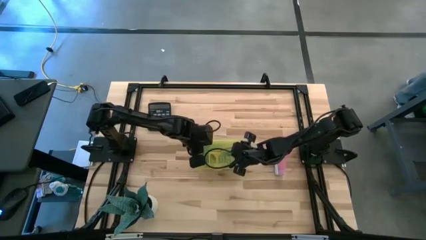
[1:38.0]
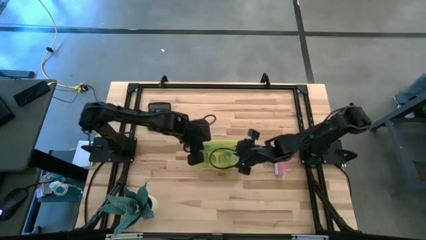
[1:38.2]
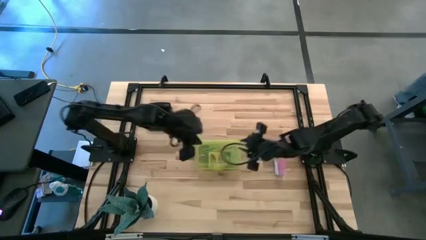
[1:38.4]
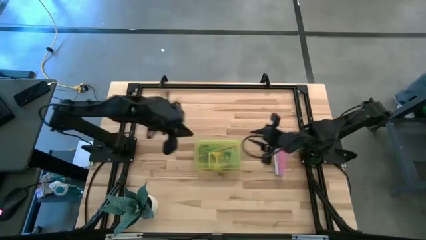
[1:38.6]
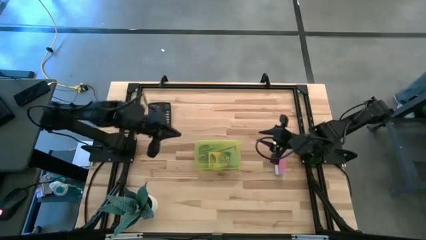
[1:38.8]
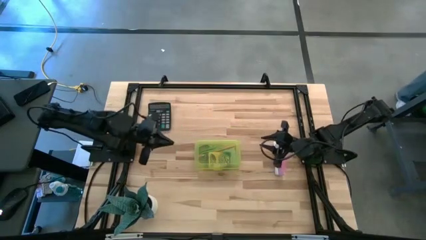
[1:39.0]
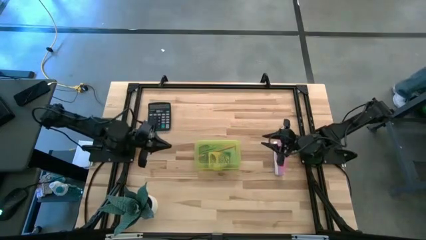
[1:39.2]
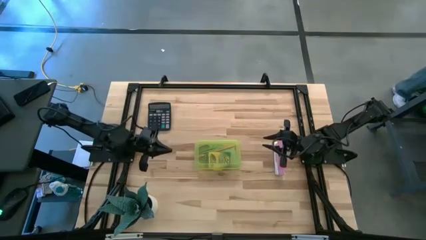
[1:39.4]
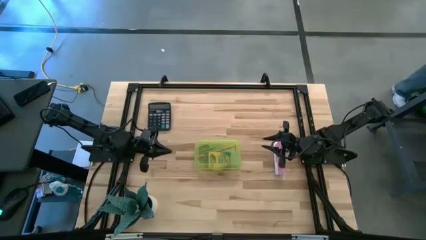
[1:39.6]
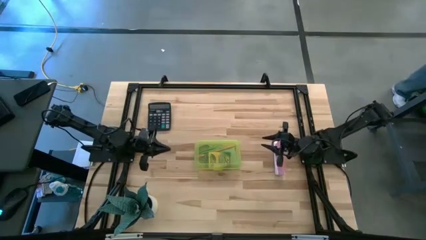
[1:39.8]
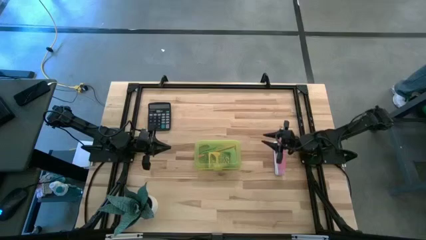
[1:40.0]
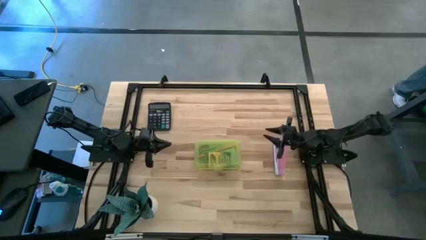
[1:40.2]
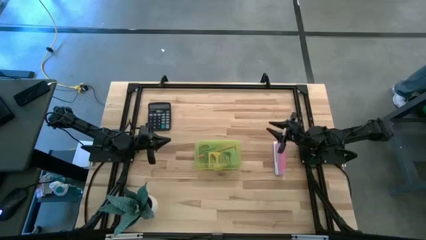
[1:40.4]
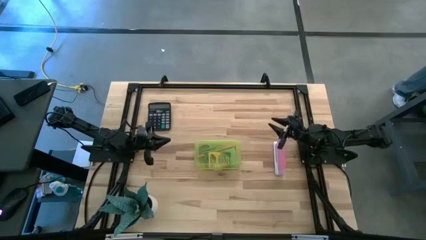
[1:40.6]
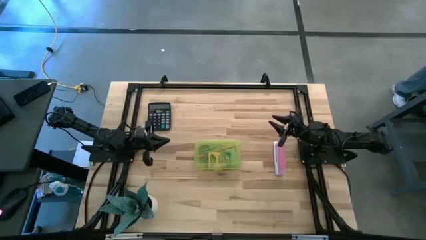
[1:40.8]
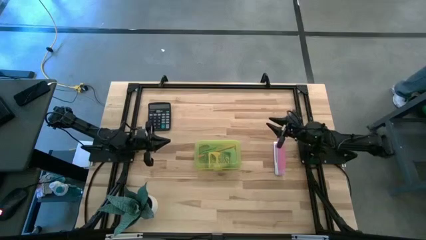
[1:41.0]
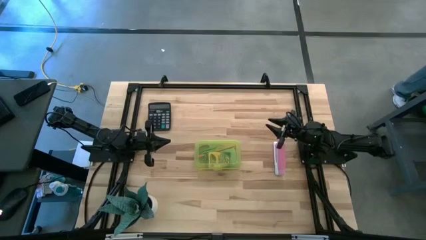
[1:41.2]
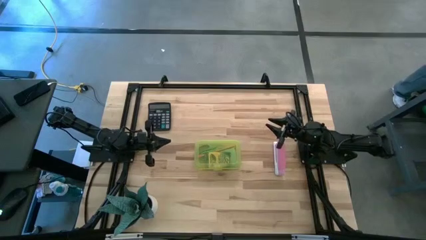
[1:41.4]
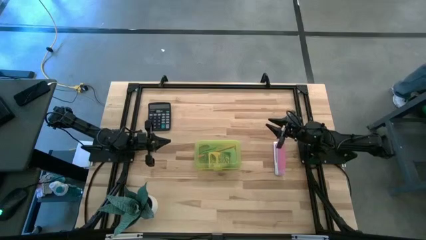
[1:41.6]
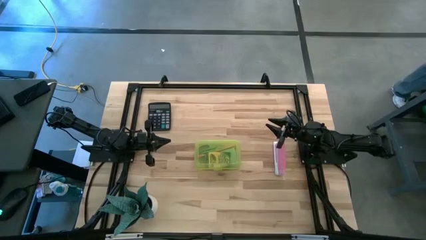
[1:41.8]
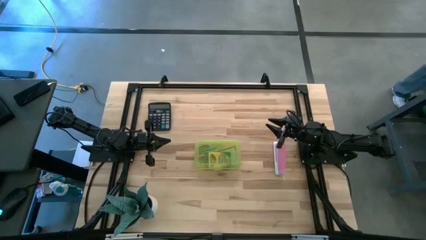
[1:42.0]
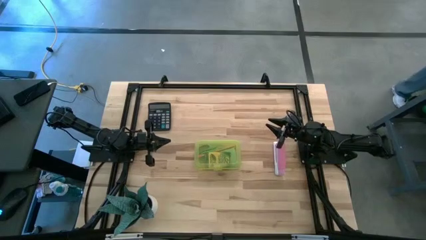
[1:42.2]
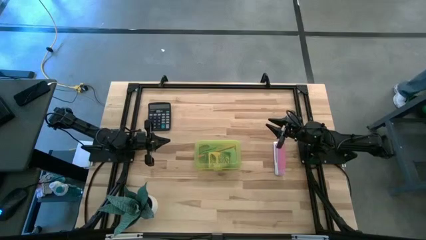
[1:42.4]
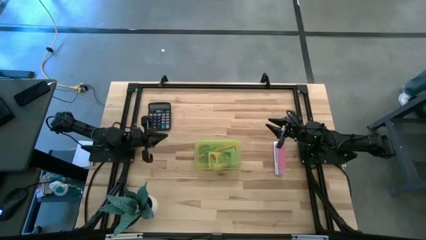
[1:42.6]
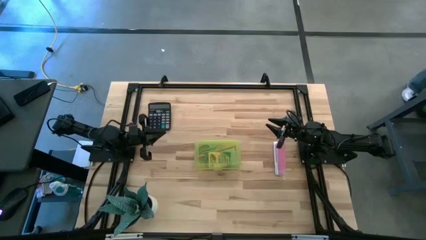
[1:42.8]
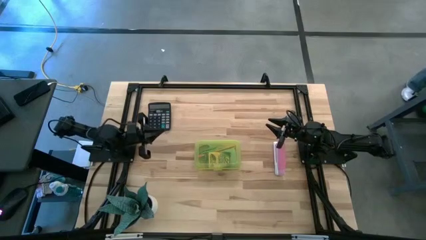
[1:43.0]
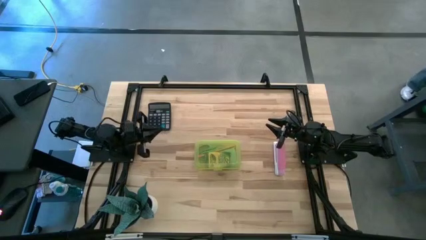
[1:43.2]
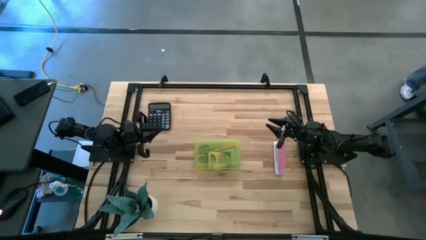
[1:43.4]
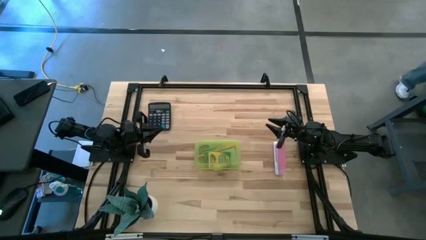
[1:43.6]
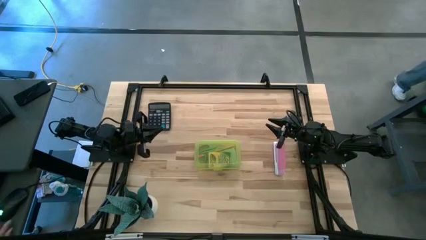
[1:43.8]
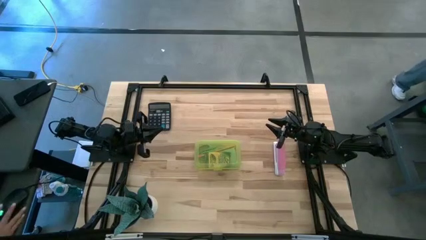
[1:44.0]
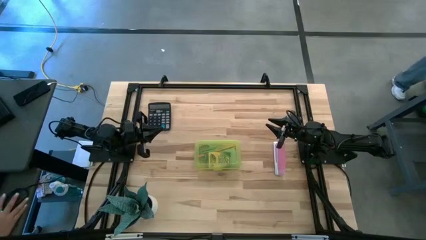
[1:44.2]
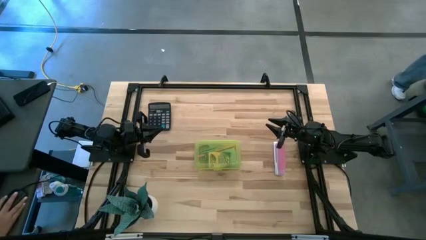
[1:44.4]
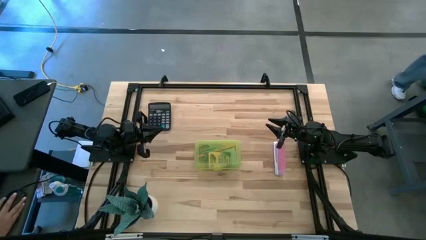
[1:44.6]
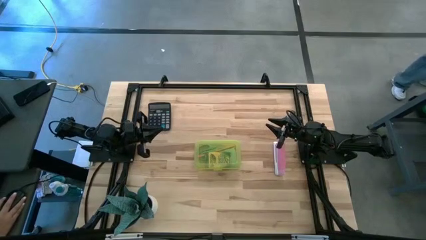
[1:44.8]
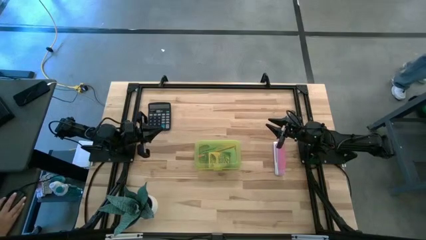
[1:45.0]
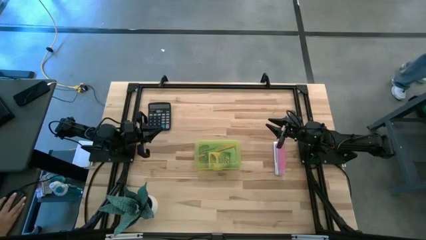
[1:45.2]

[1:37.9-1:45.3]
Task: Pack school essentials
Return to Home Position
